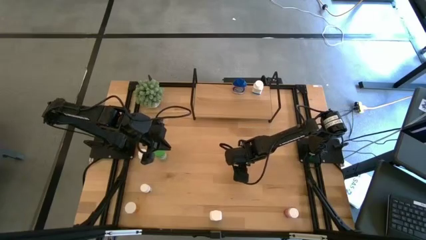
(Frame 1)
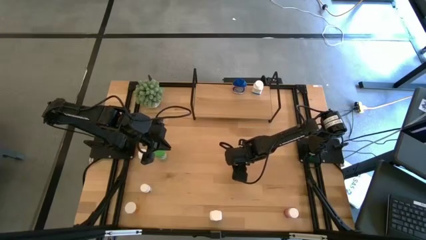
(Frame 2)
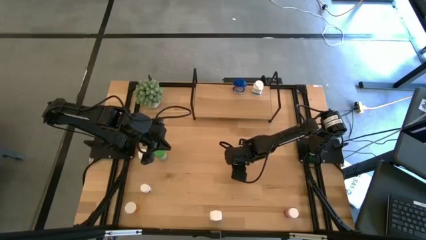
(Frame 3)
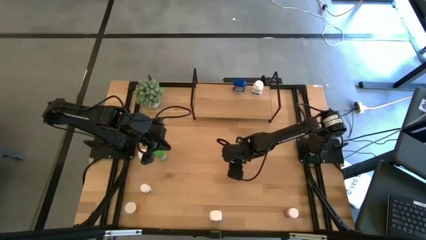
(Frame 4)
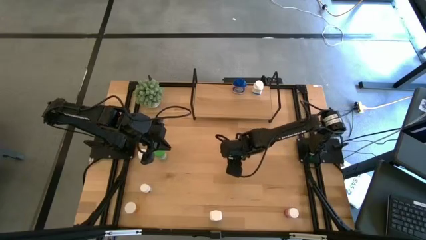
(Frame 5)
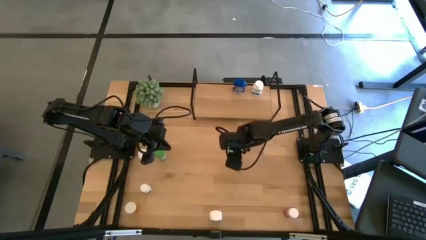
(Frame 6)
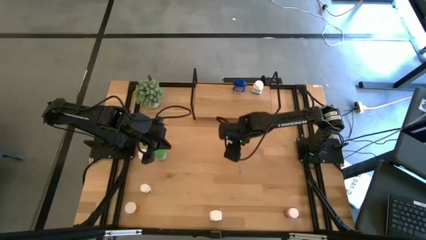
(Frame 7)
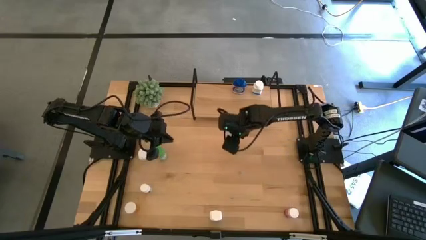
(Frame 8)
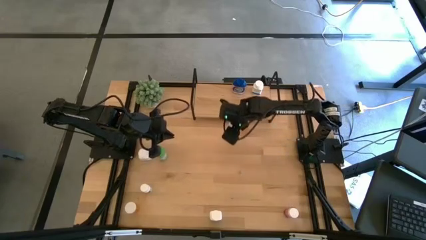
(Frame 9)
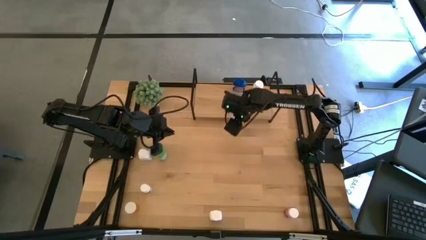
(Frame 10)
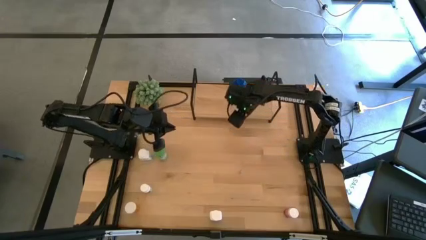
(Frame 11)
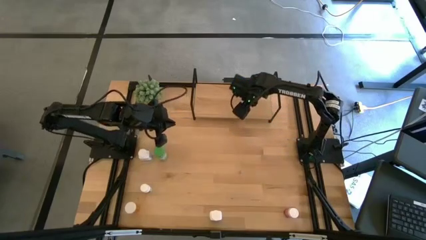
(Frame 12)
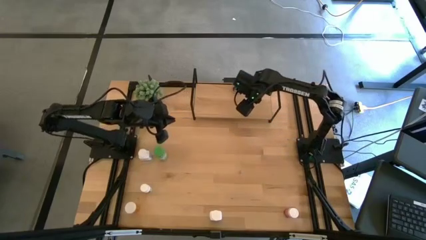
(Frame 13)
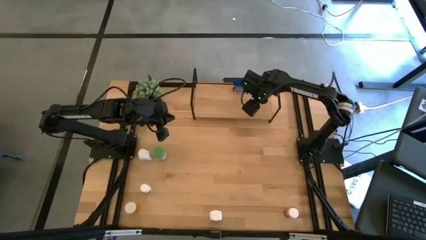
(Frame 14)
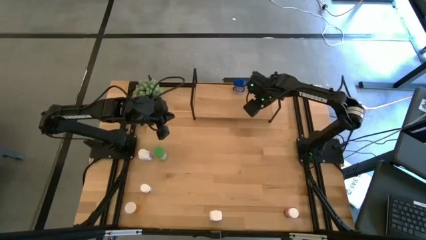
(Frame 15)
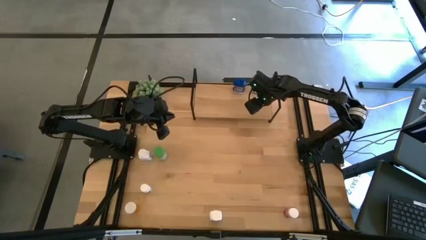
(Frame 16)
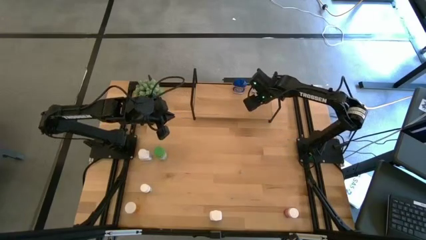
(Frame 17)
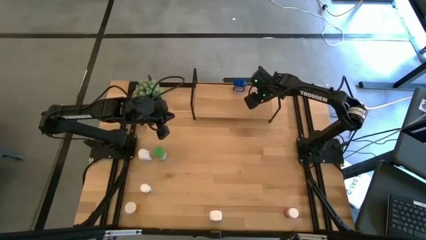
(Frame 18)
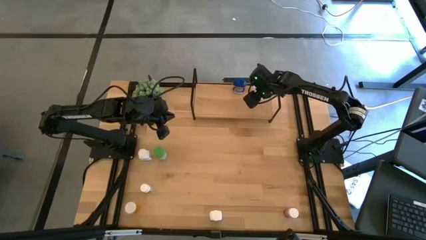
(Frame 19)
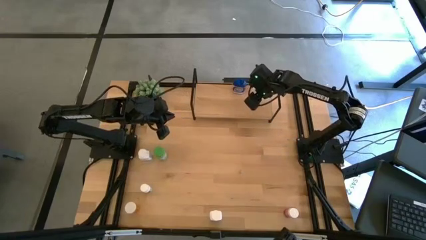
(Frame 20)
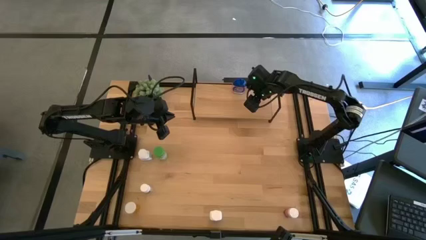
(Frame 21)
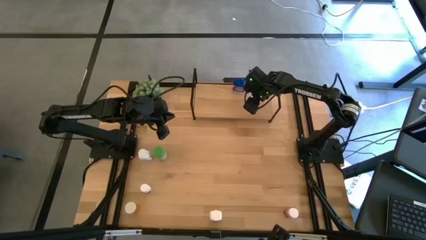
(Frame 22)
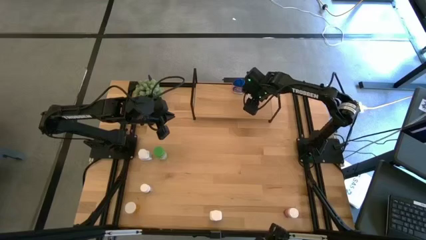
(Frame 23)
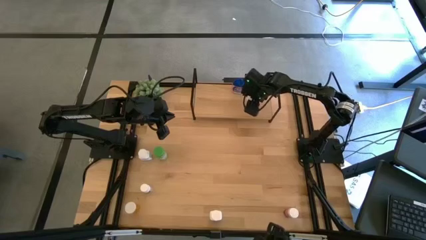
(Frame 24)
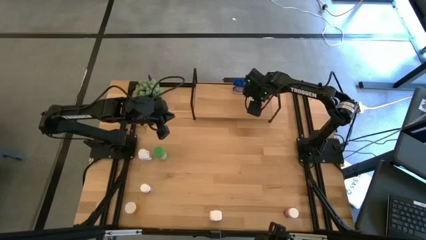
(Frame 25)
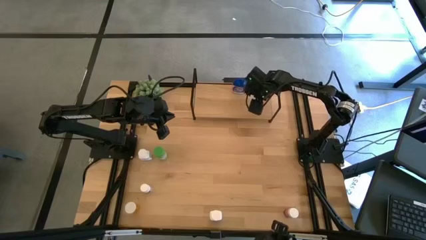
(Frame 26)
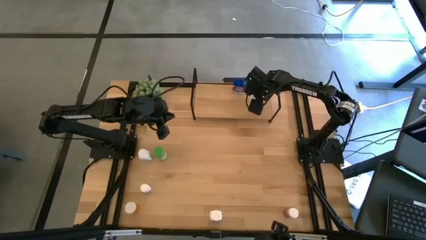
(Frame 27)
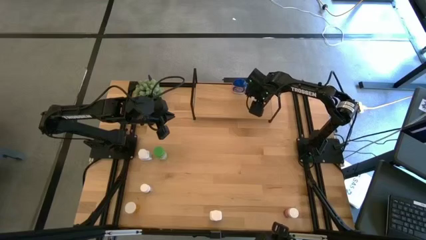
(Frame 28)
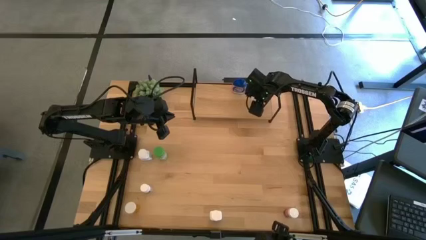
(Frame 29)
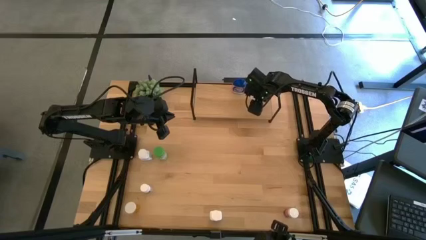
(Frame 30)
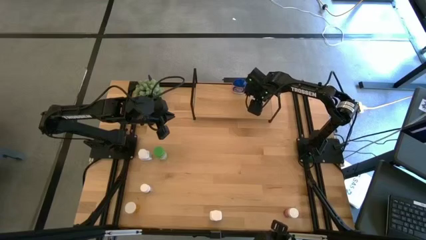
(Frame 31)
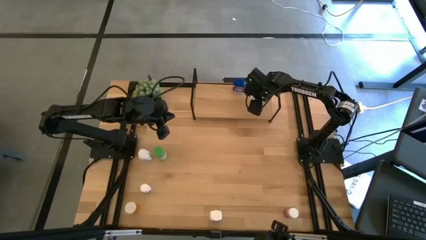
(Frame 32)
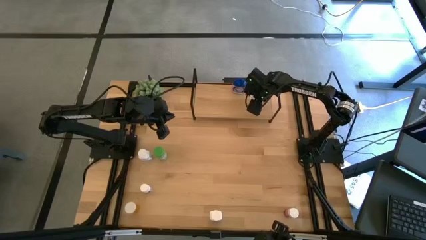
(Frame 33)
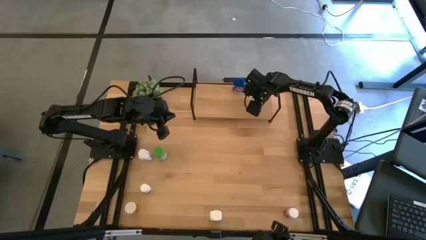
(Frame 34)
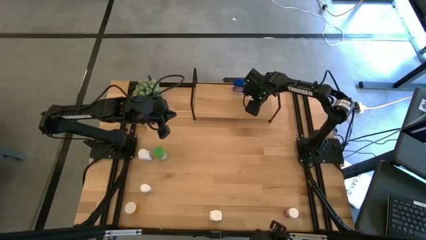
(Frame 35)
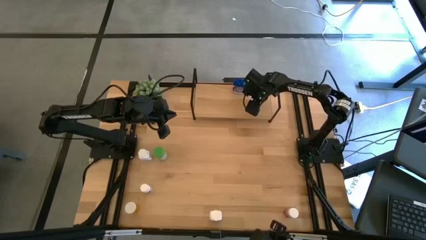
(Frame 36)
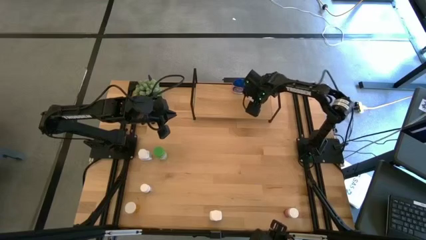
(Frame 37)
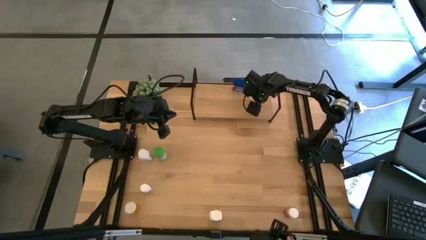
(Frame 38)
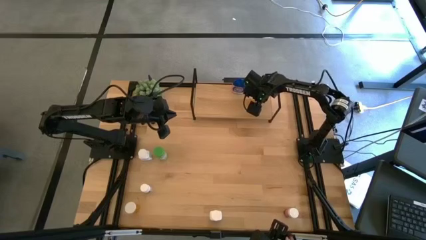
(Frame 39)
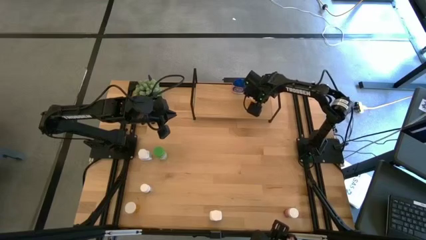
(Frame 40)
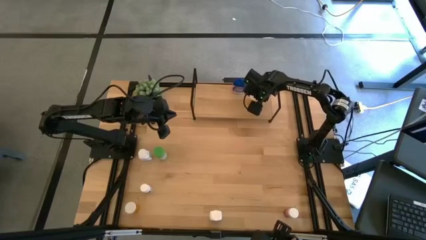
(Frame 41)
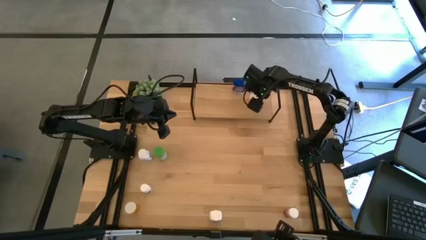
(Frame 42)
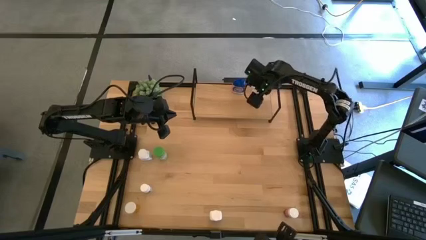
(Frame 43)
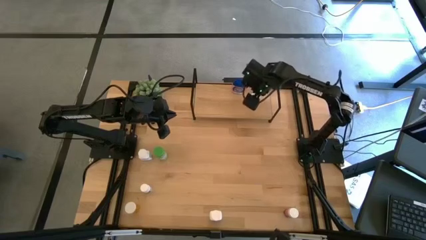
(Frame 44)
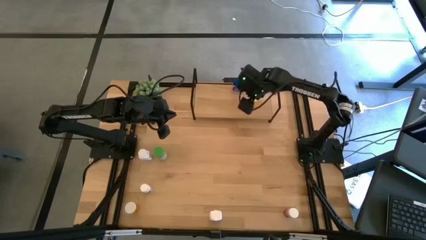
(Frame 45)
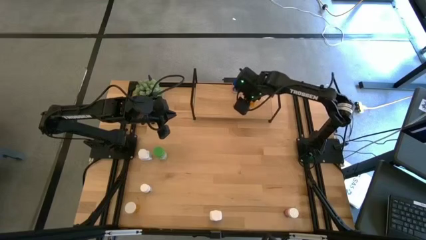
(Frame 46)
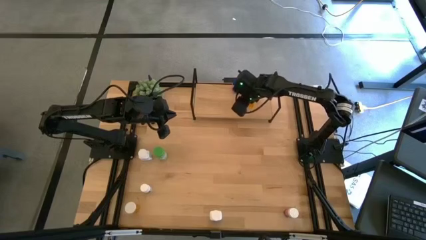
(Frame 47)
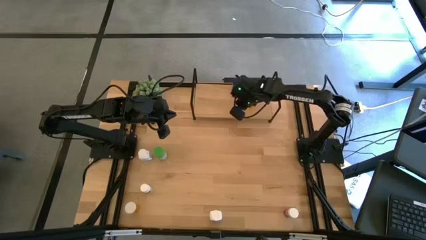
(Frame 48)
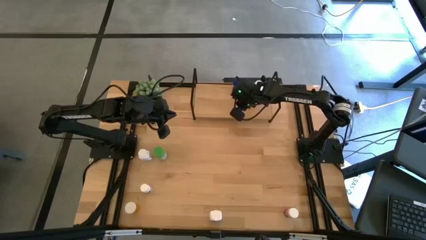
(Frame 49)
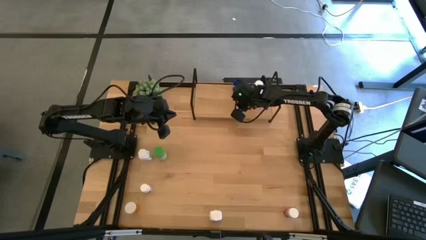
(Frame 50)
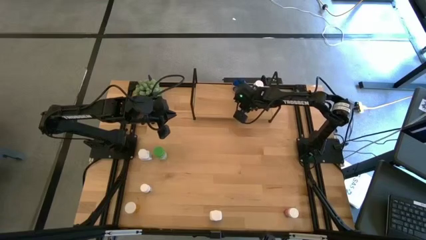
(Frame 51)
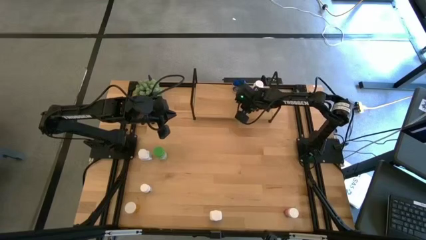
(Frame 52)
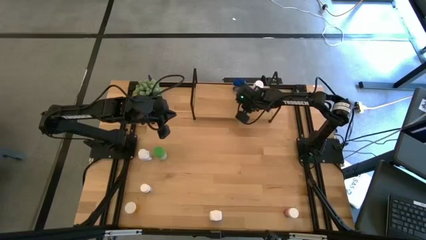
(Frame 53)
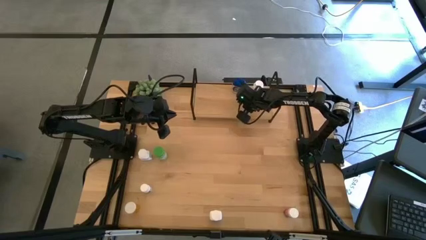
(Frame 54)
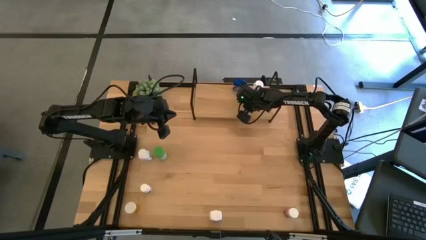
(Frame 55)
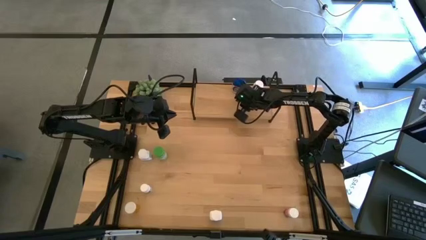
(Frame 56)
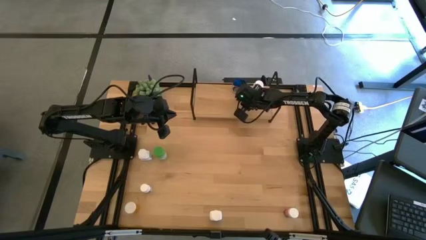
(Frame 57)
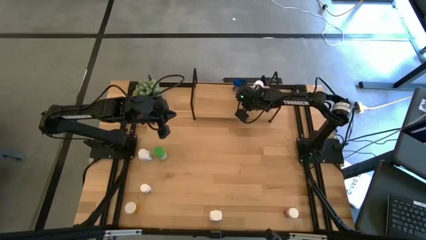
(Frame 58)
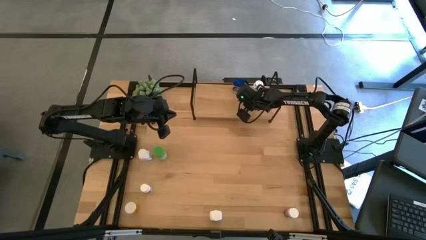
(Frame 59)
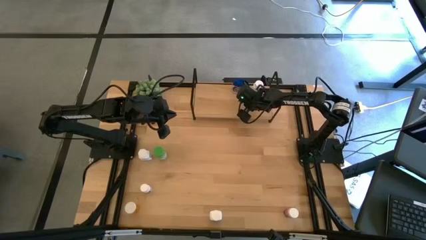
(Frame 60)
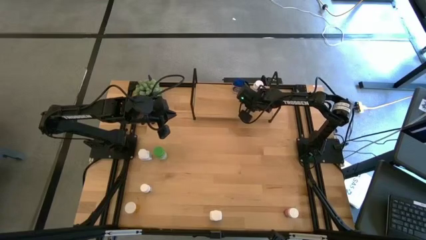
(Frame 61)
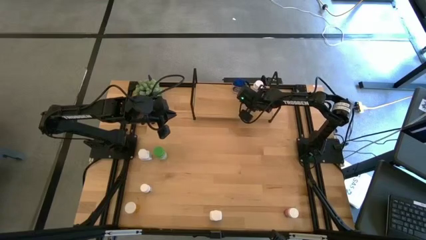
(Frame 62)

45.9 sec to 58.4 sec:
Task: Pick and place medicine bottles onto shelf by color
Put the top orange pill bottle on the shelf
